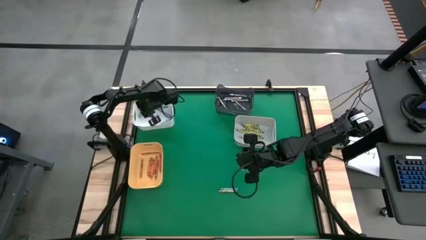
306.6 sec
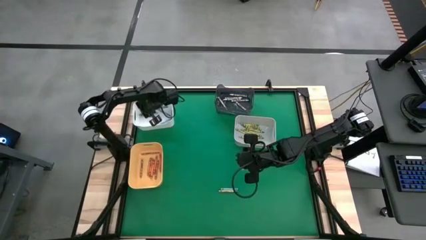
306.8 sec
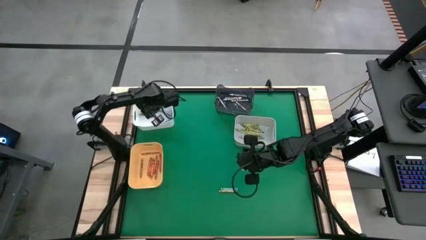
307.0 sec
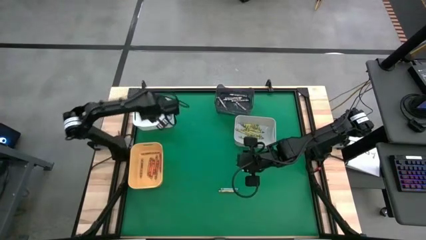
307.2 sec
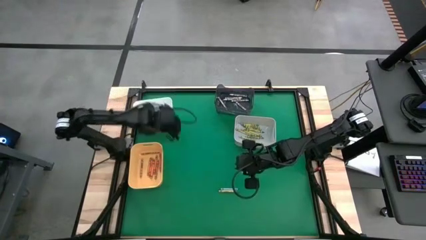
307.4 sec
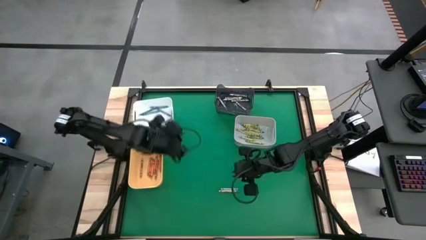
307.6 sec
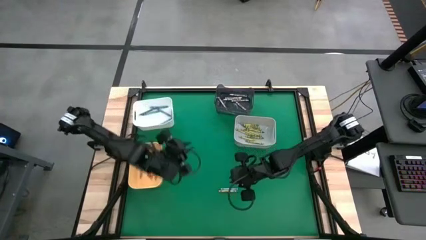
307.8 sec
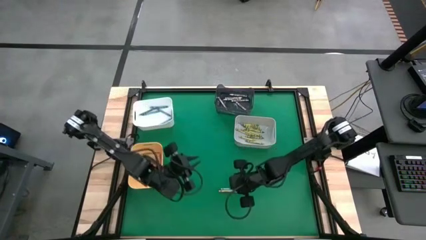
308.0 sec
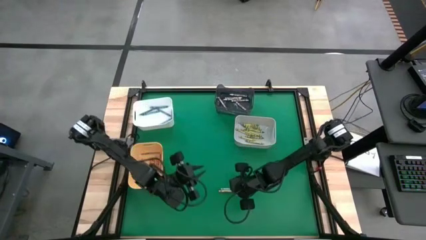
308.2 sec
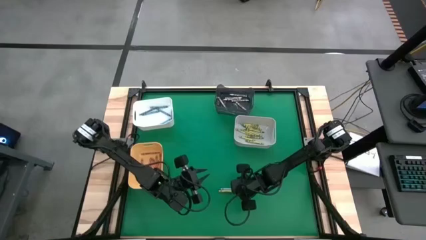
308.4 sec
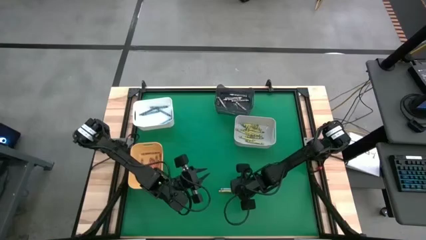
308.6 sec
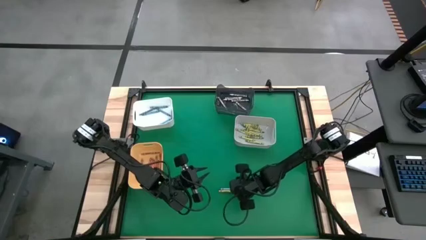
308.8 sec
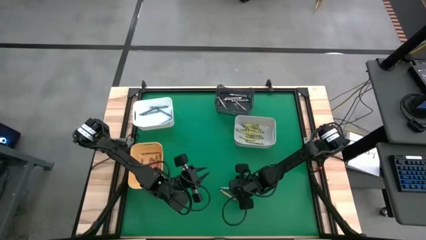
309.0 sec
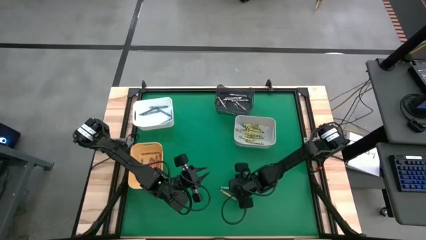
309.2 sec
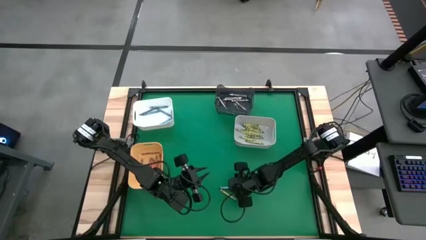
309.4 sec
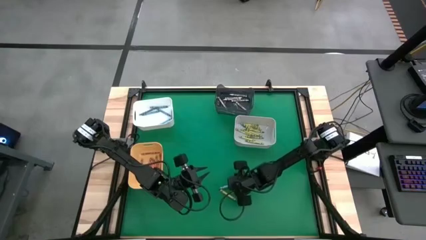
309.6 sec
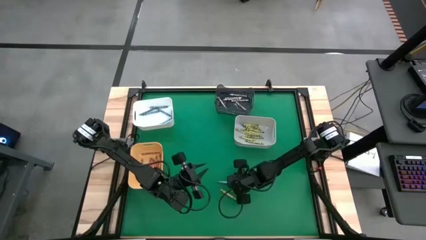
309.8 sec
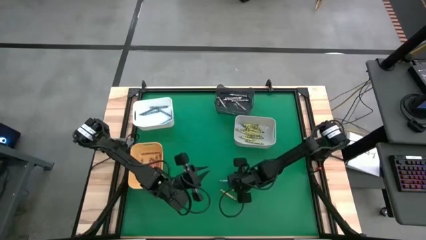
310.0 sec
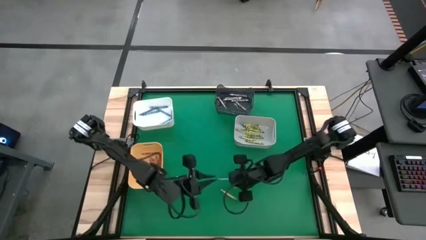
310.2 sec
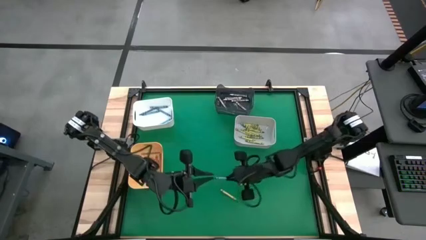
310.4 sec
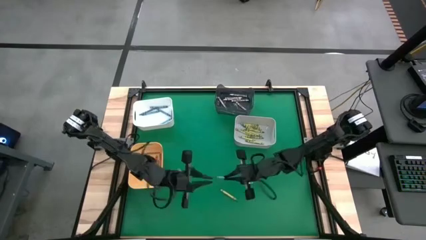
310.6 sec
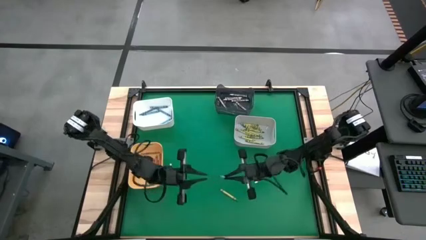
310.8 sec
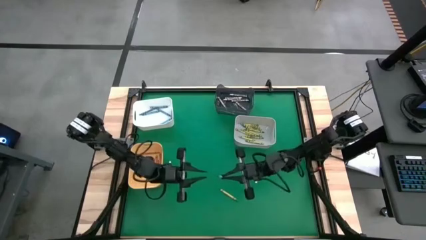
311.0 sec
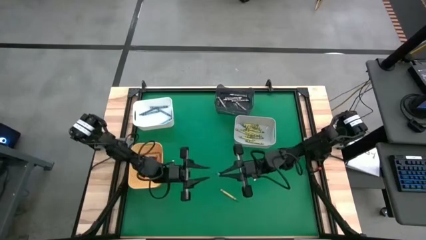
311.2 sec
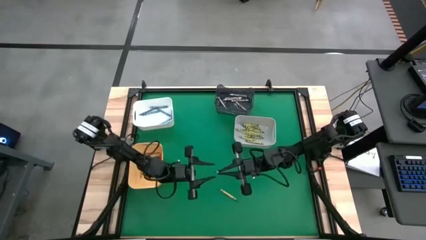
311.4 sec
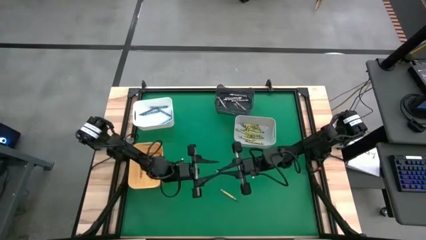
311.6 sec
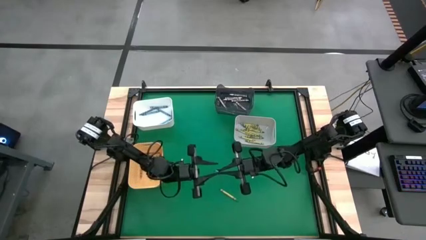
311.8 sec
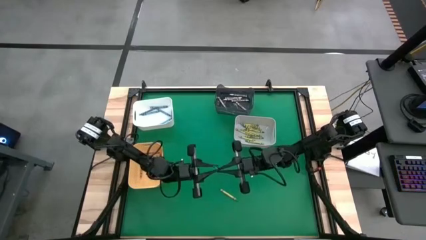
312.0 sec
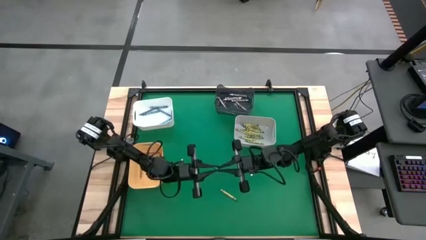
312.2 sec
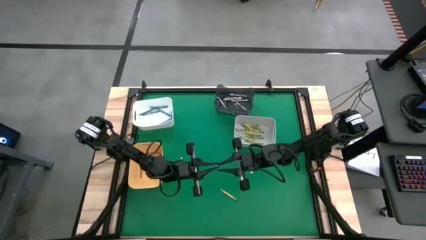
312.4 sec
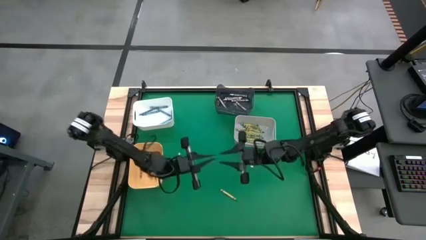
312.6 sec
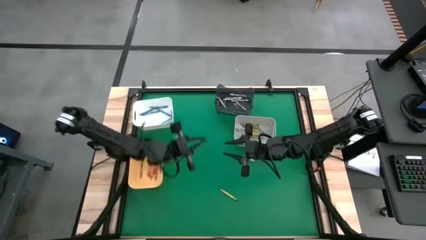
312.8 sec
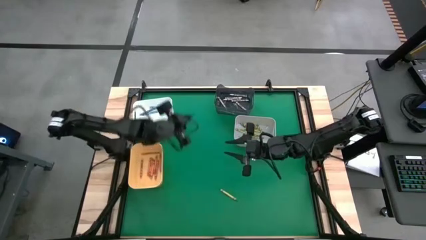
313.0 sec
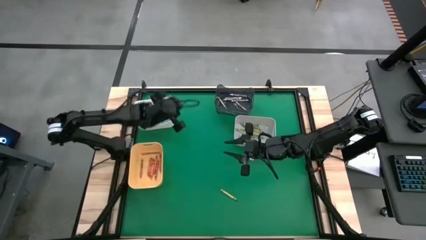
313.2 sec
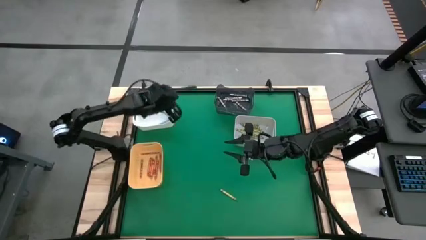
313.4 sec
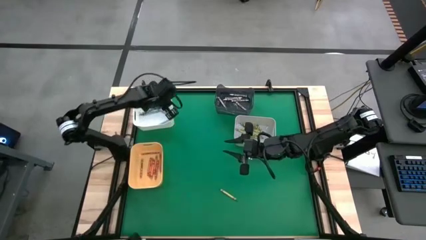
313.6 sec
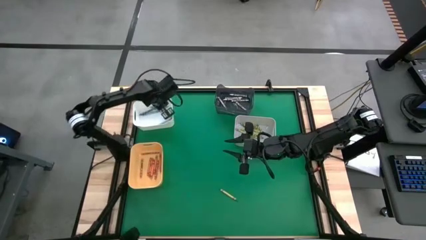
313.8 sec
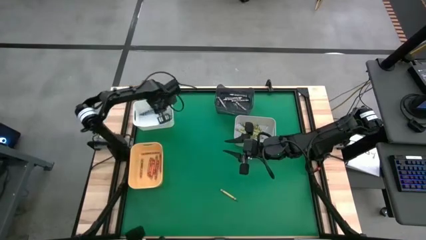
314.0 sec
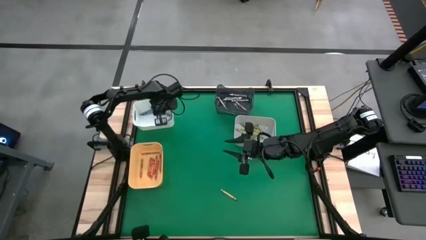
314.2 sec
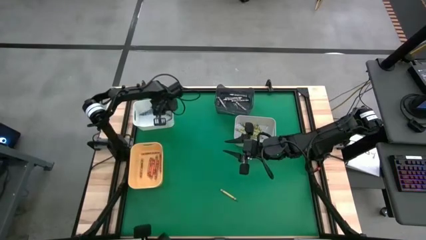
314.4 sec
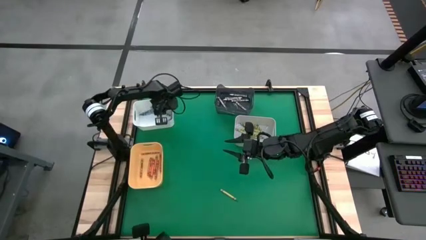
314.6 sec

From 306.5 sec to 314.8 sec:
Task: Sort crayons
Put the blue crayon into the white bin

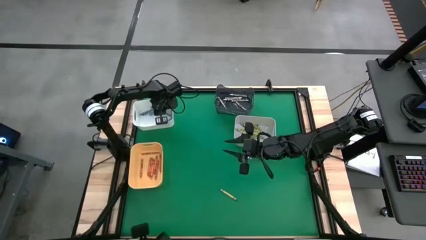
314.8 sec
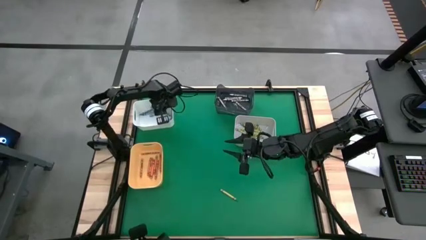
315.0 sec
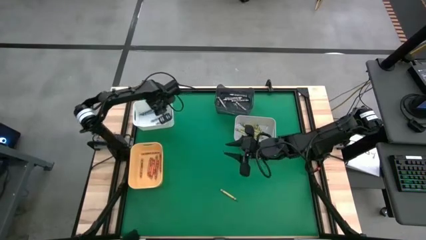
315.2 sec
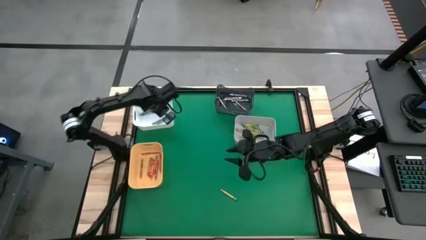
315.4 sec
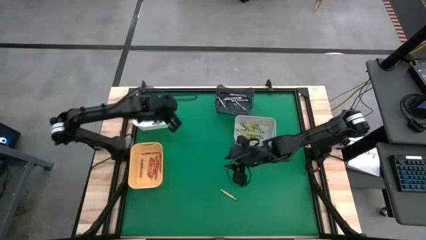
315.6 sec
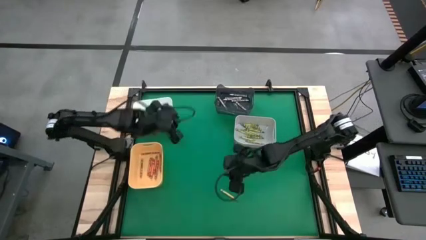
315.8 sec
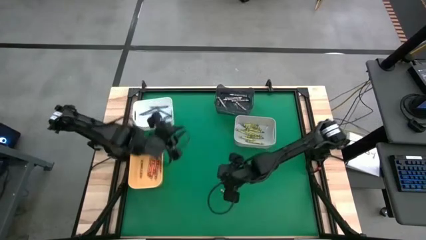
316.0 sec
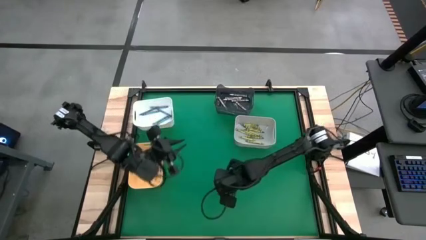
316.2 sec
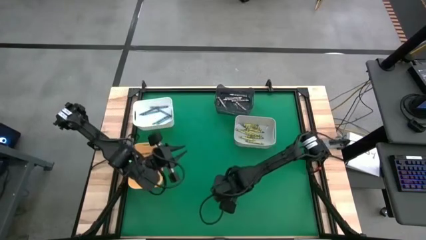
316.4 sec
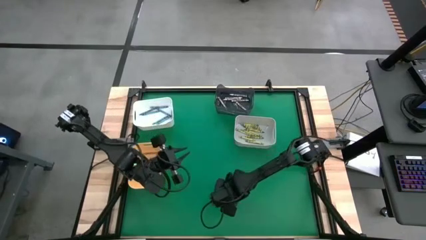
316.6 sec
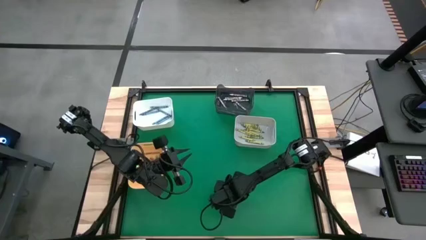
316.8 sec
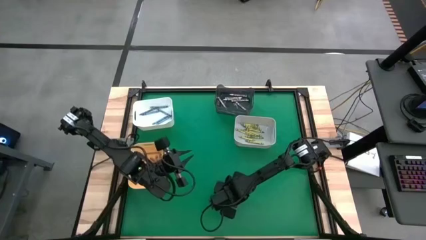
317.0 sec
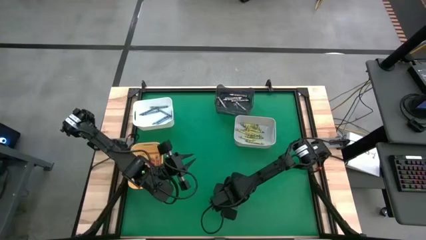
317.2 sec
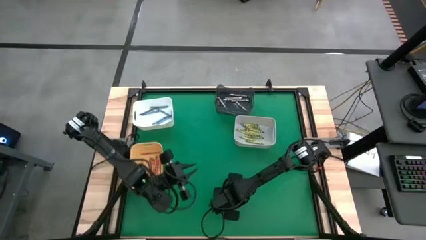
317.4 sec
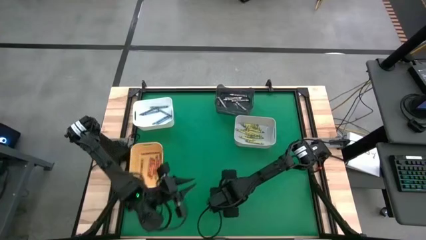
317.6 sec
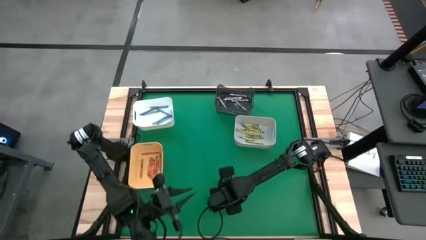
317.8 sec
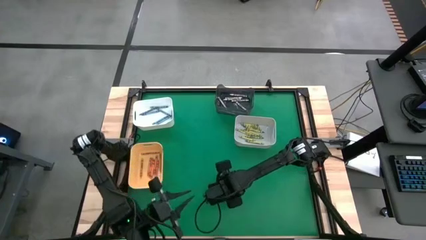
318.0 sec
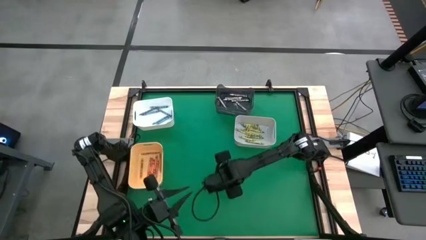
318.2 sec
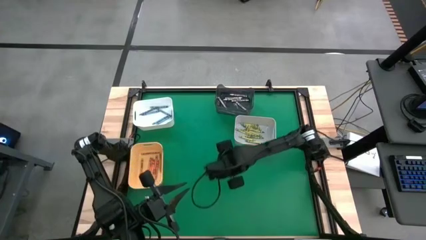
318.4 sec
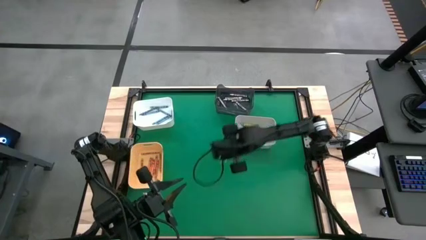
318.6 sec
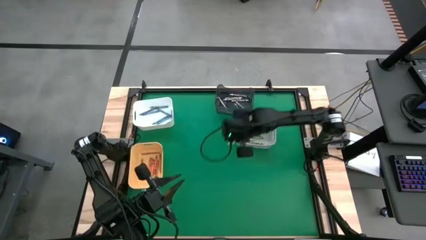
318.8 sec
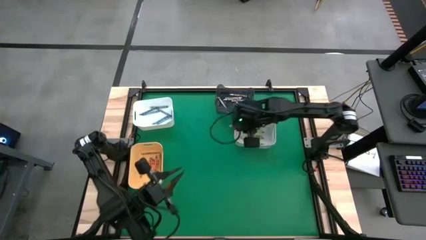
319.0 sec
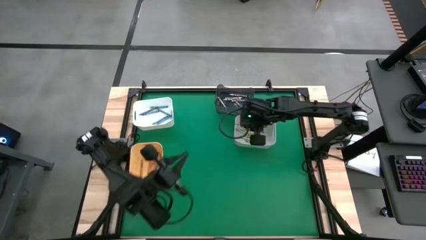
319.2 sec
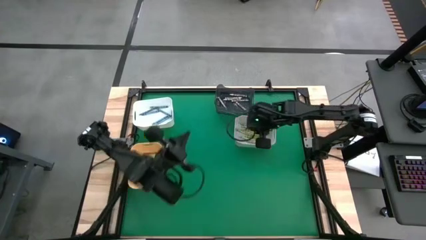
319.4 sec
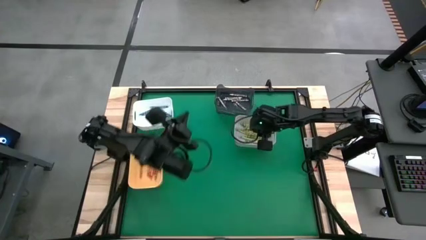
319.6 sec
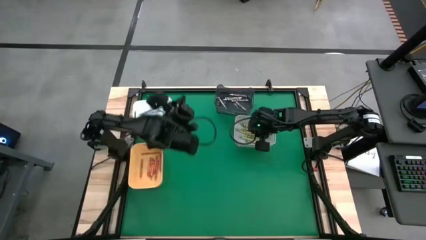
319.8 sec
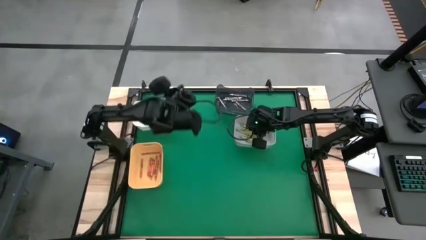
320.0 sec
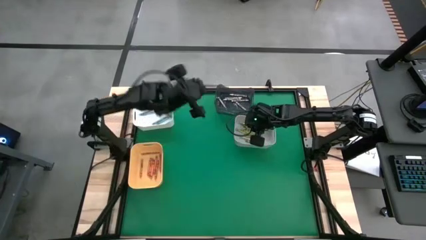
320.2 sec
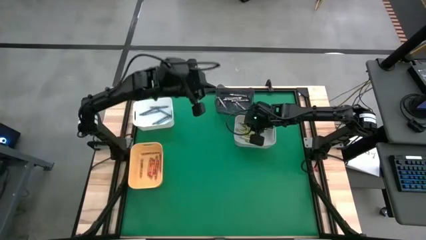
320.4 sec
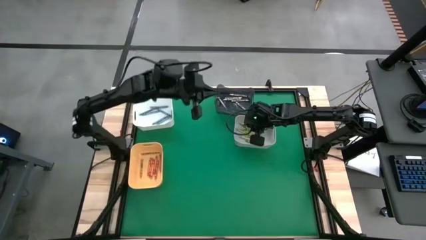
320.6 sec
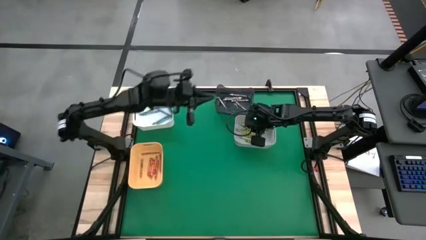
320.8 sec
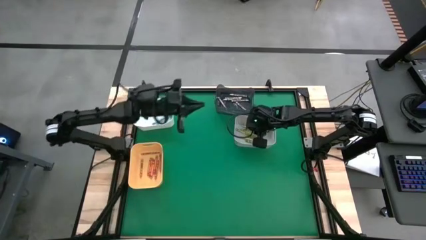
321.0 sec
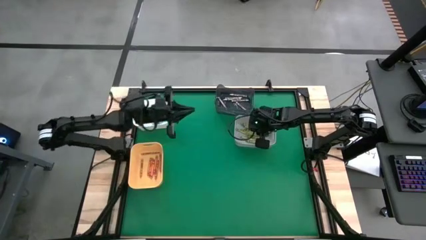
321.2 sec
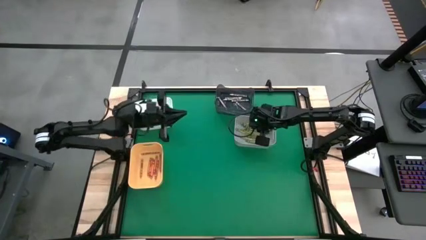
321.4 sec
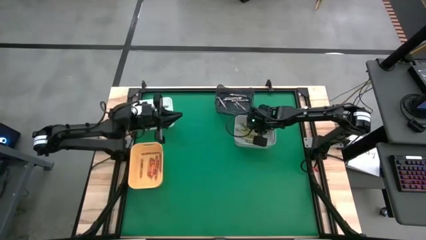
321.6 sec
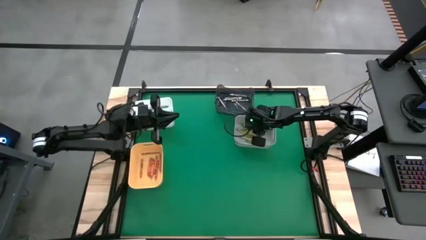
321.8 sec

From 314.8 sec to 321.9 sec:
Put the green crayon into the gray bin
